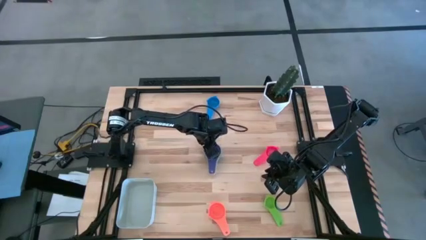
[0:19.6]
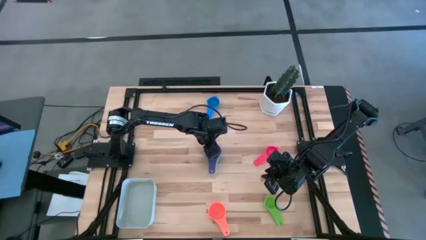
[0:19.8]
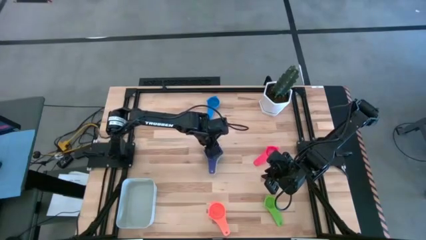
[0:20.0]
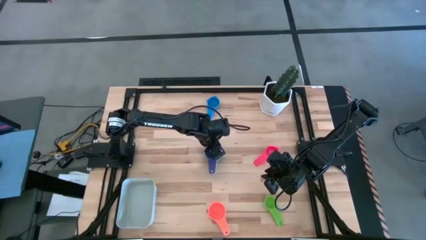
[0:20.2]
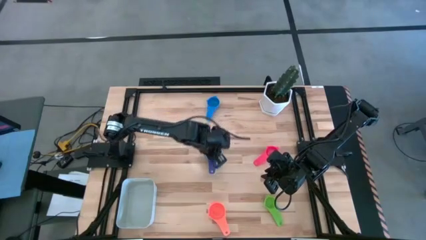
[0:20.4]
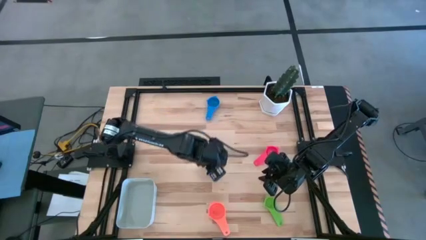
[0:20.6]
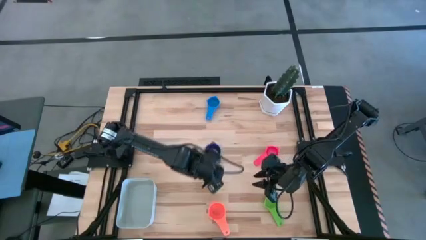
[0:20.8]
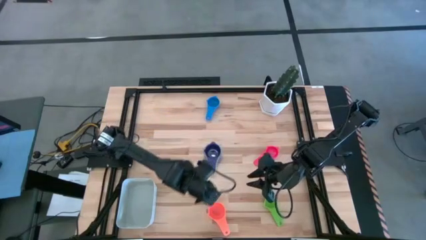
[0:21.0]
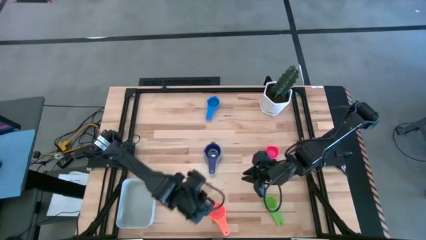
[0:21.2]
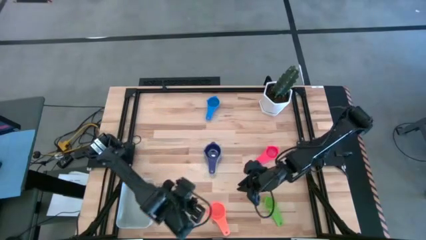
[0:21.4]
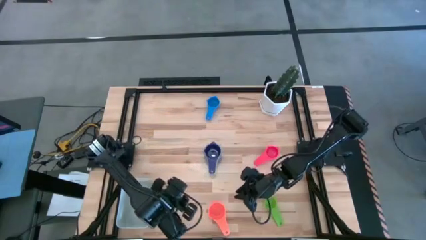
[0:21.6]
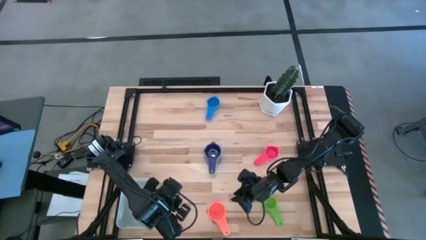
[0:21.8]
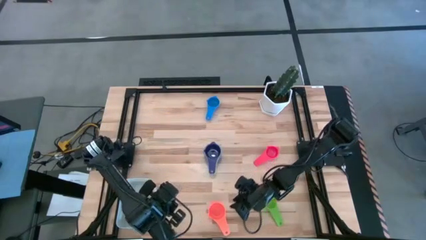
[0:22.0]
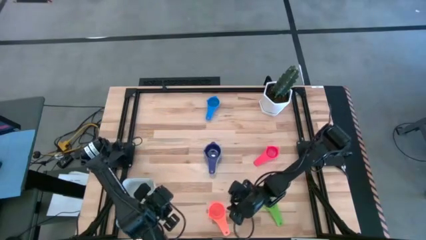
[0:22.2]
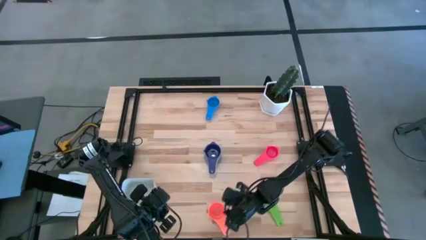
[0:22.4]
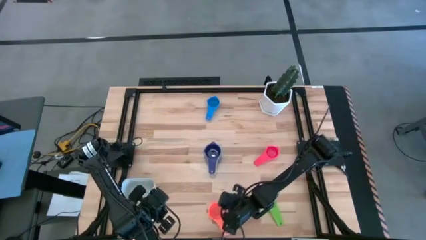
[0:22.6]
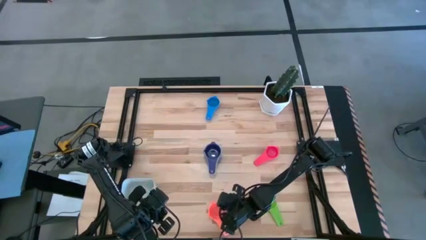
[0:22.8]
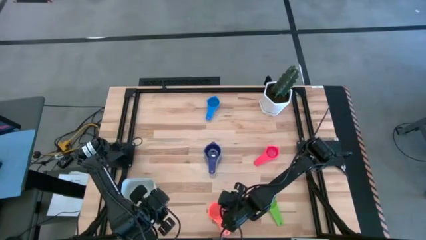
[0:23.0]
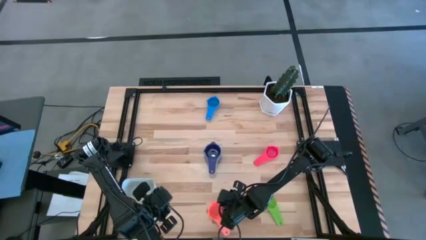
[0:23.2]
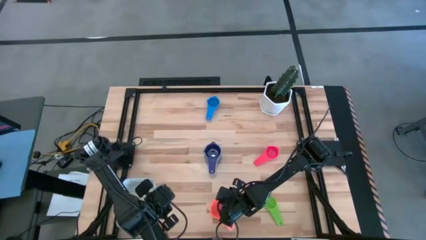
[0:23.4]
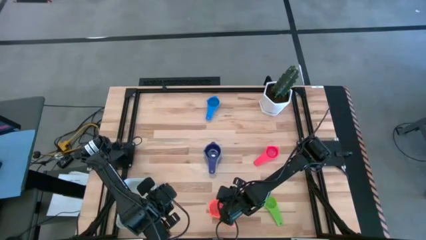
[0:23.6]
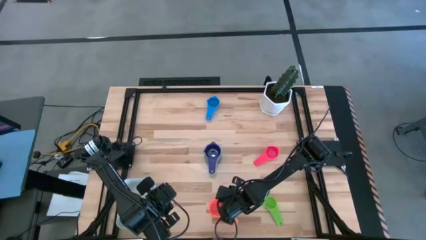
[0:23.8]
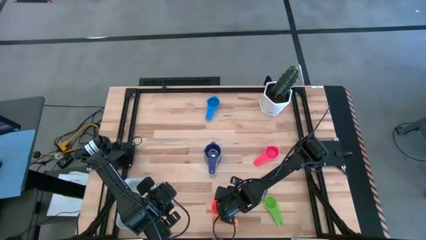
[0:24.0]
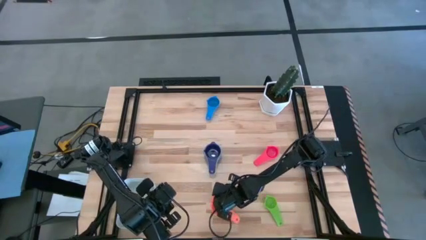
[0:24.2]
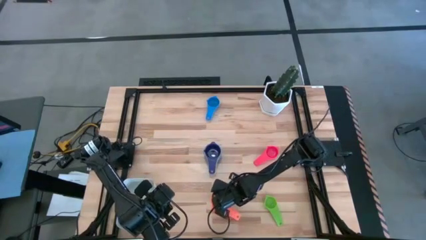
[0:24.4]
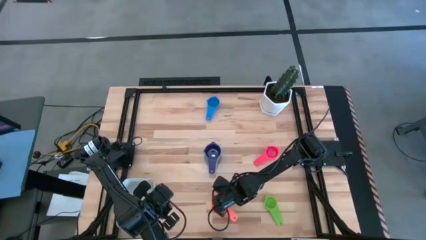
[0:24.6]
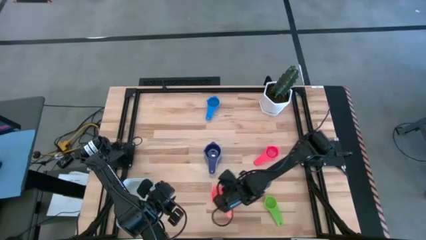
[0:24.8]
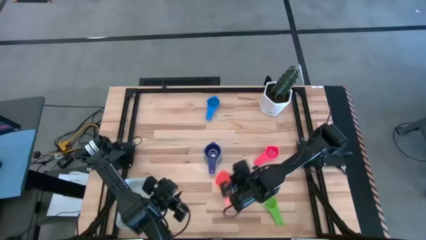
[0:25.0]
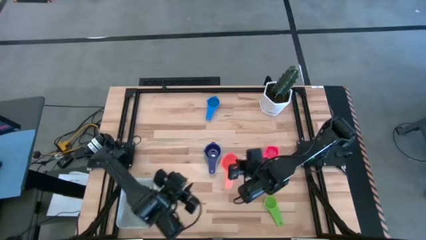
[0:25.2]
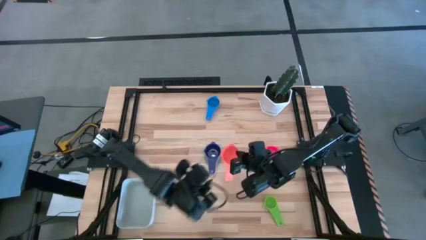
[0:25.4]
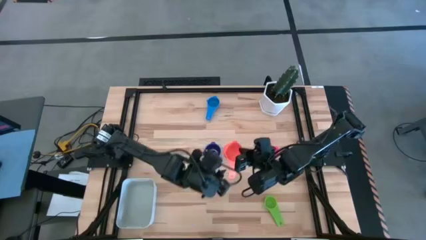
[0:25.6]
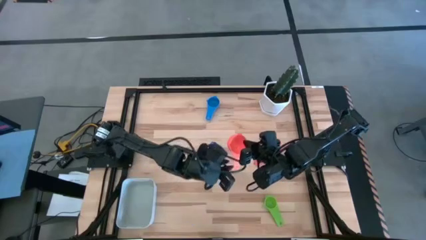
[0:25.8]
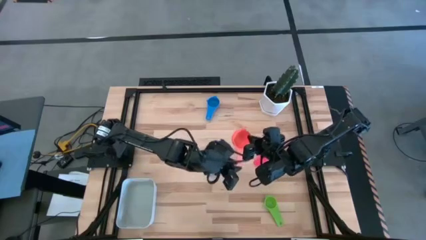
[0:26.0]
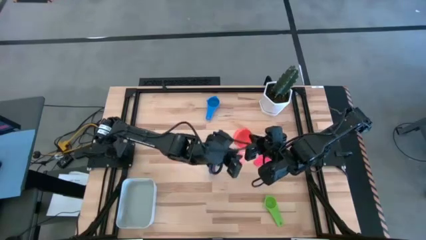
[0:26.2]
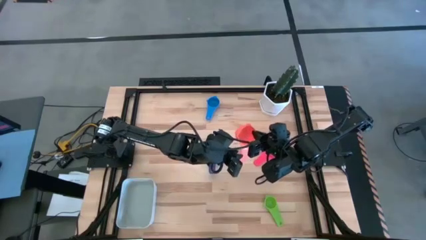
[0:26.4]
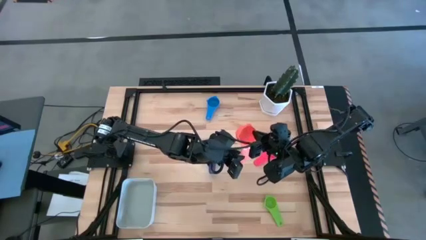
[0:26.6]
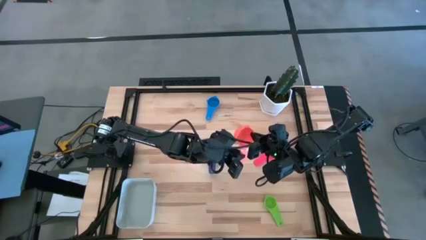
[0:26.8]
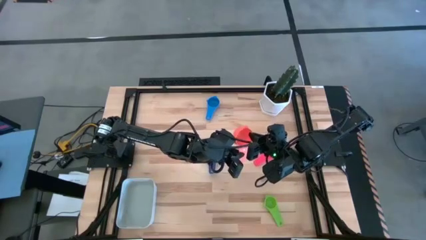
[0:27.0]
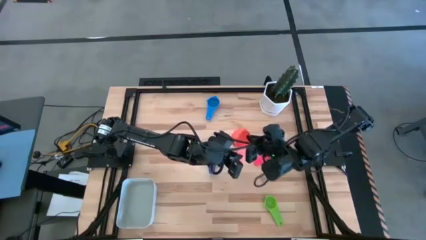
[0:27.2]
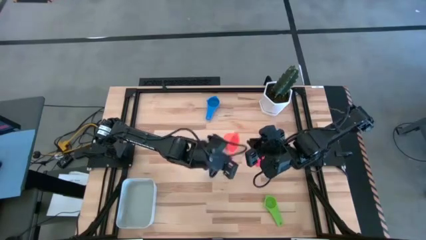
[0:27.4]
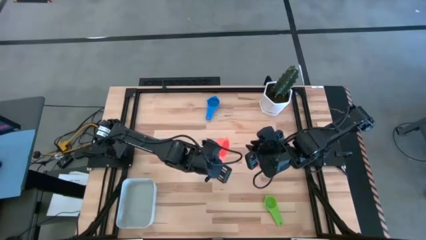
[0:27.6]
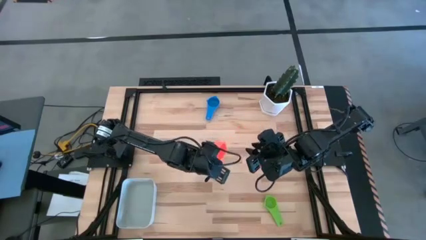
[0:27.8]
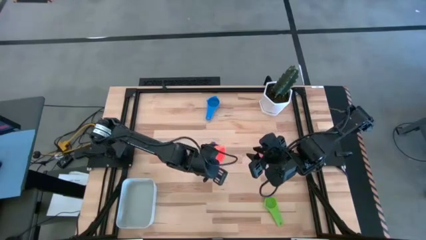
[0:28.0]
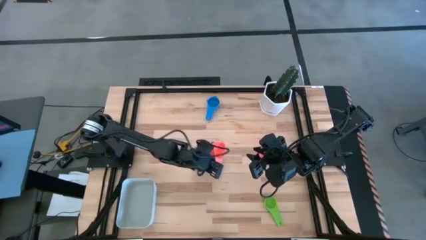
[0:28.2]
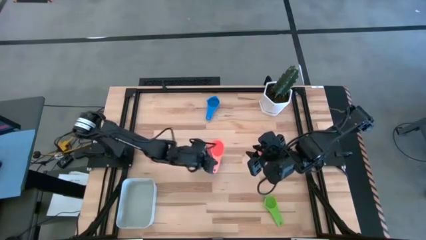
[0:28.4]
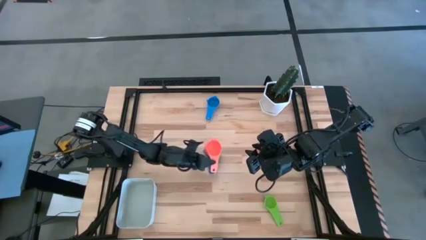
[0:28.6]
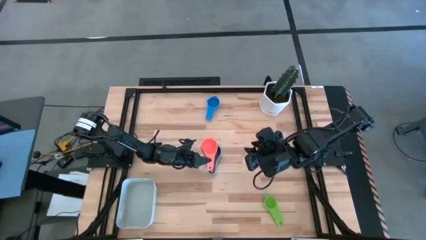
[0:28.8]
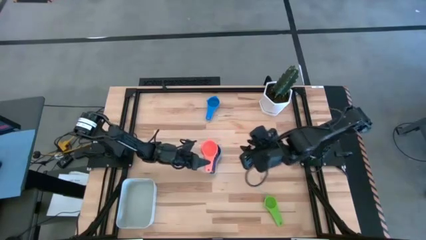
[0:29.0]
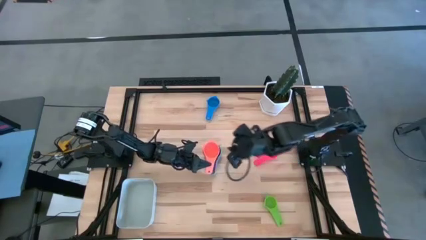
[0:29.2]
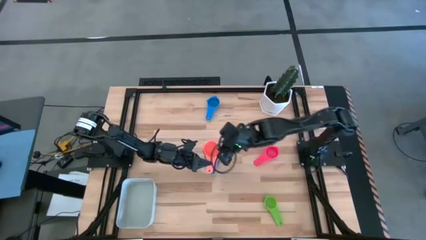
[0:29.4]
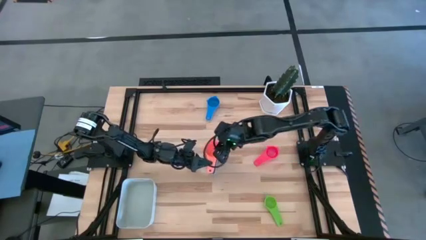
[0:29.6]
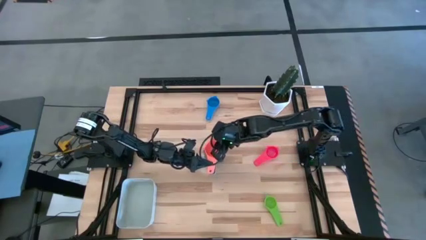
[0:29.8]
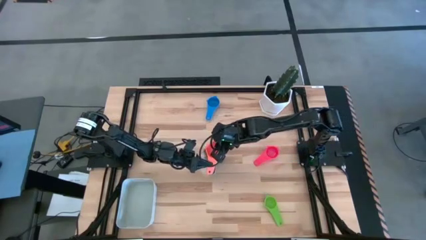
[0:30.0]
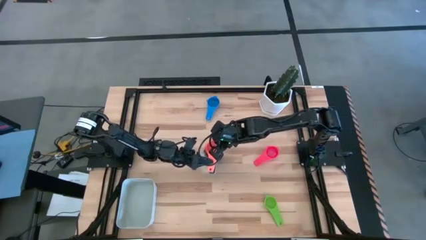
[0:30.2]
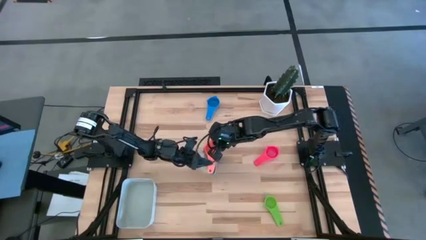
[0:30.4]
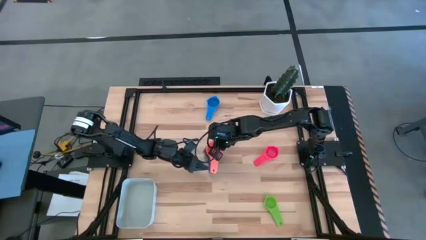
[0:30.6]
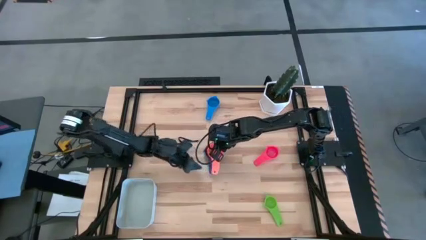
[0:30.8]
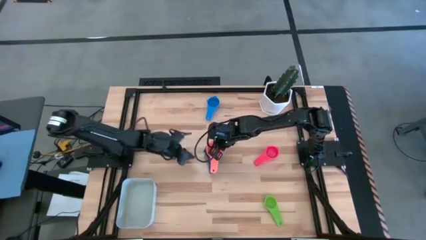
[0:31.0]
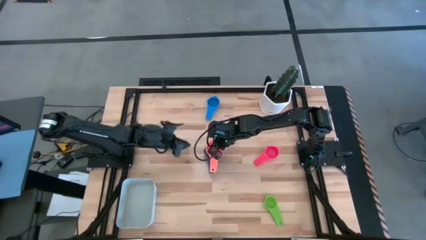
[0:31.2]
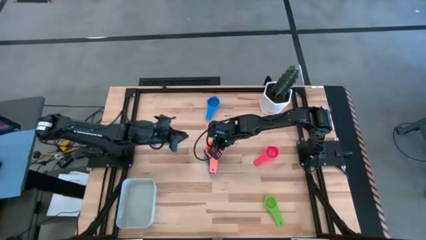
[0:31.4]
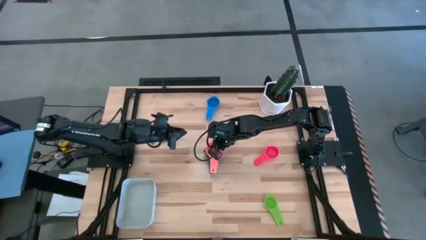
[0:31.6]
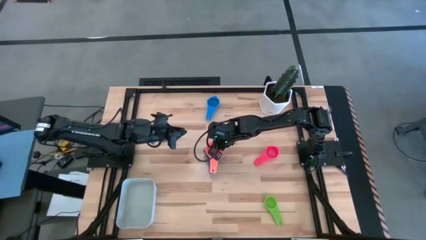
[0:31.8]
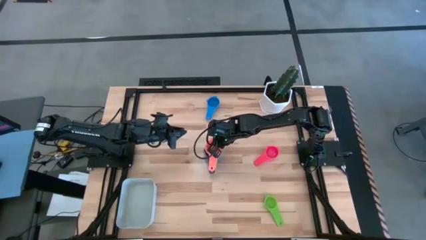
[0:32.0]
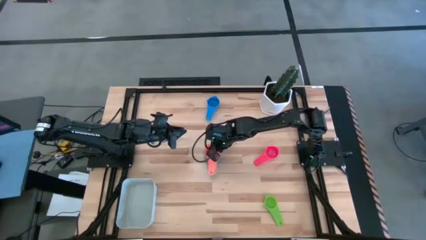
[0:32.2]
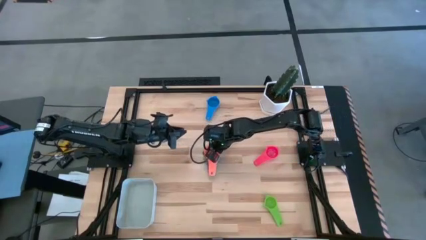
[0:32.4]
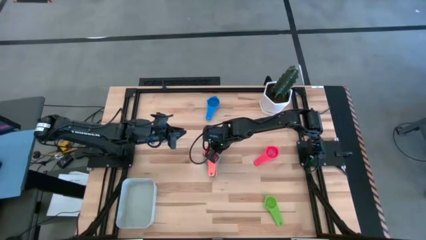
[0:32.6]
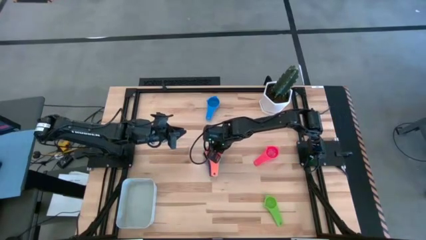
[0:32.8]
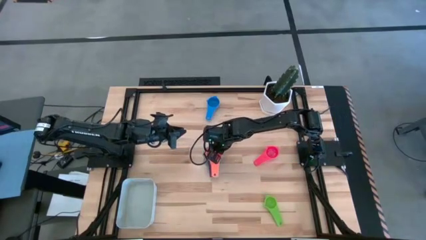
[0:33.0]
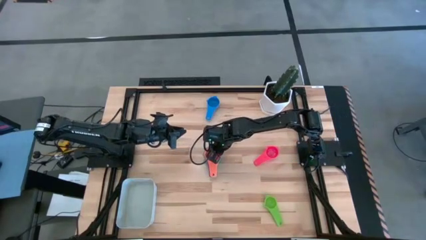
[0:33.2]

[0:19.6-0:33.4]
Task: Nest measuring cups in basket
Stack the orange measuring cup on top of the dark blue measuring cup
